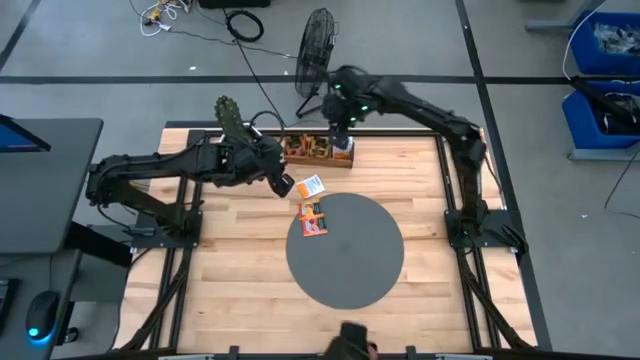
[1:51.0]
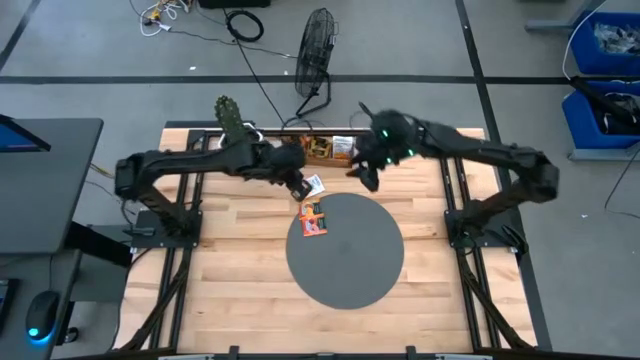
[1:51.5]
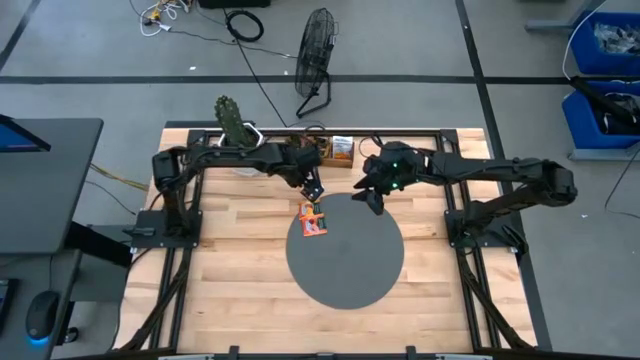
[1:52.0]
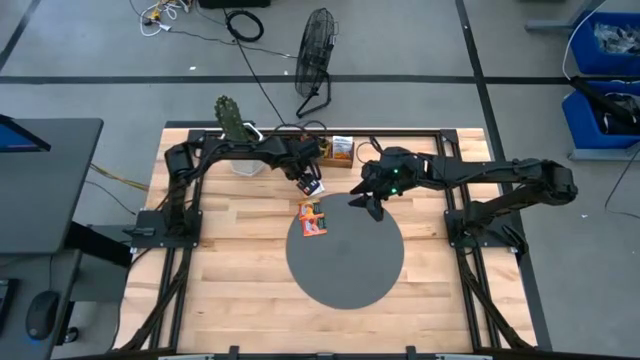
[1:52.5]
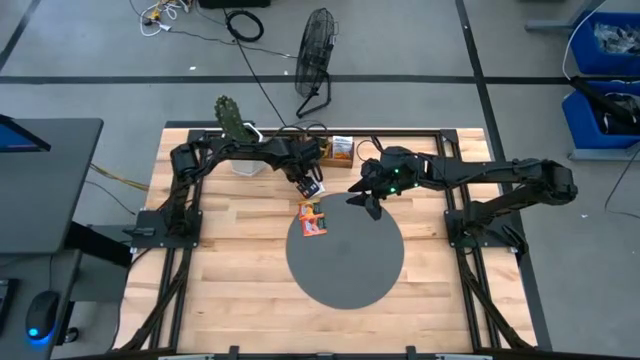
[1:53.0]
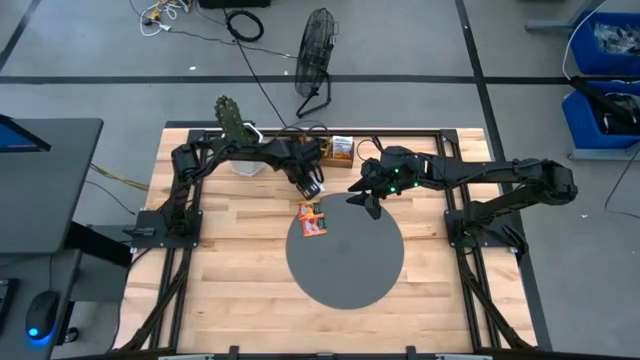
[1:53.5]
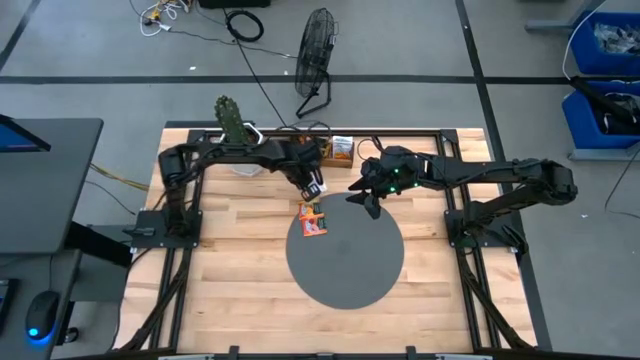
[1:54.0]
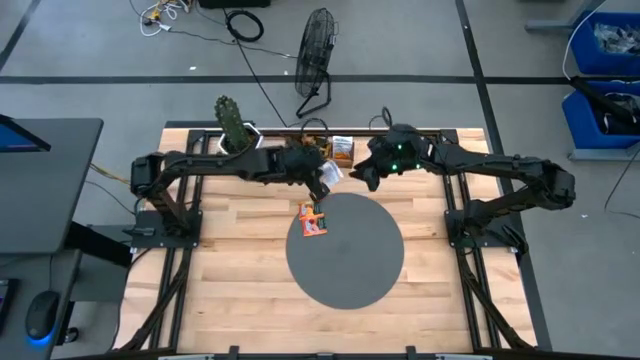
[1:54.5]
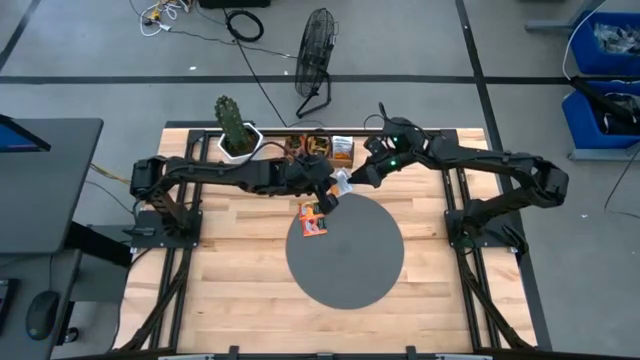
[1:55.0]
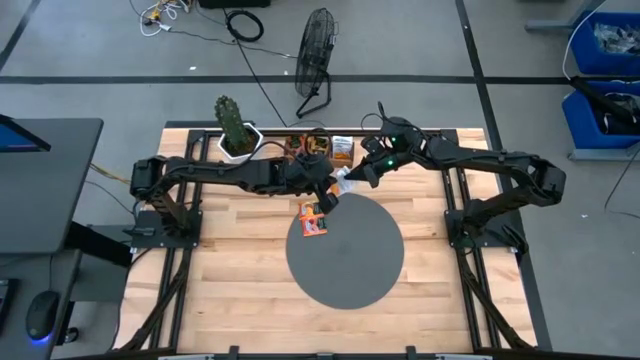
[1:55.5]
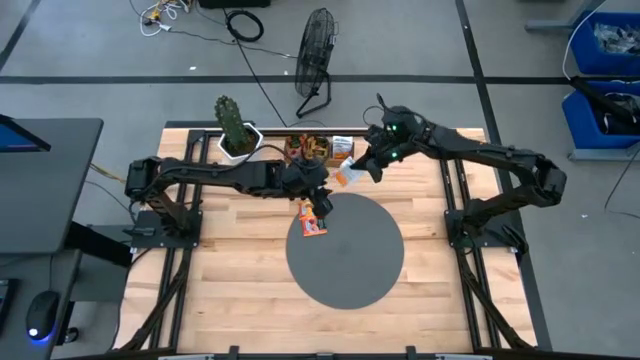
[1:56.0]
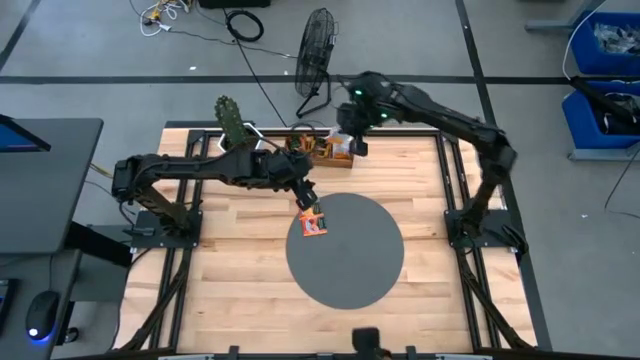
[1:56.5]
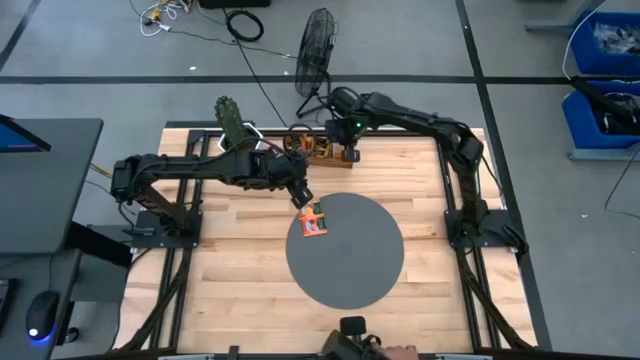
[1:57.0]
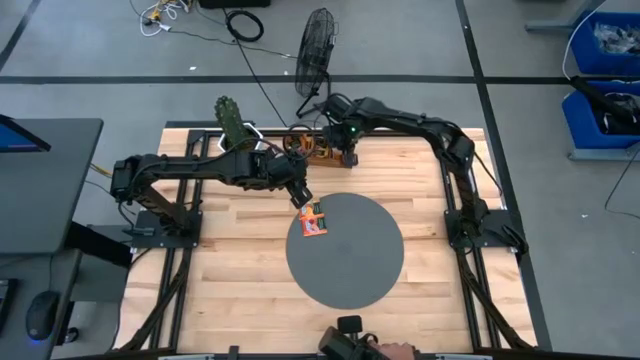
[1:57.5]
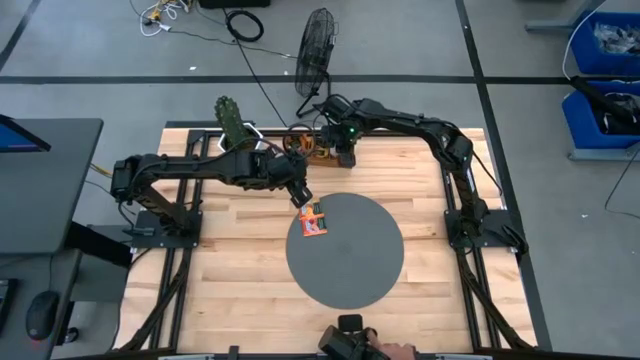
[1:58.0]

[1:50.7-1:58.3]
Task: Pick & Place Tea
Put the white tea bag into the right section of the wooden organizer

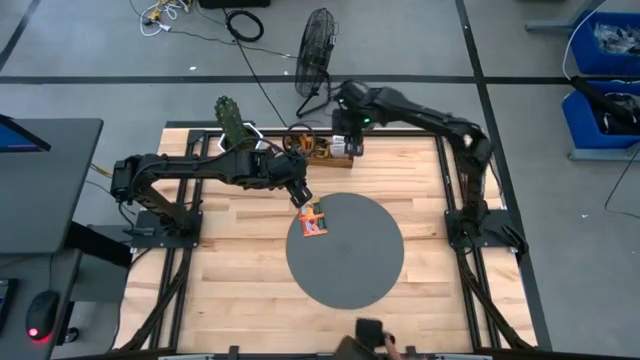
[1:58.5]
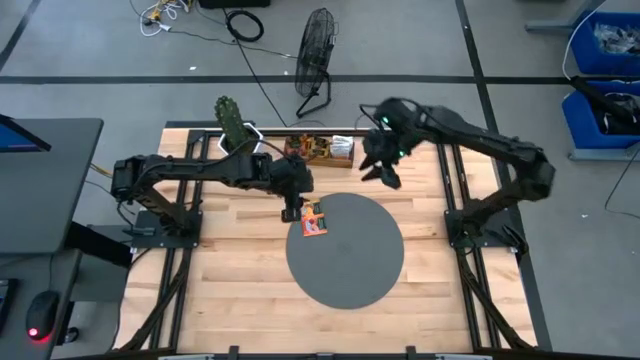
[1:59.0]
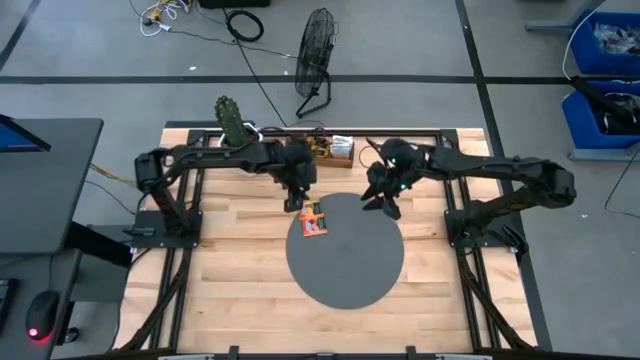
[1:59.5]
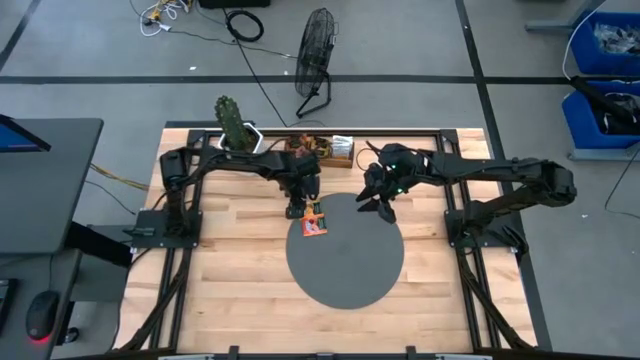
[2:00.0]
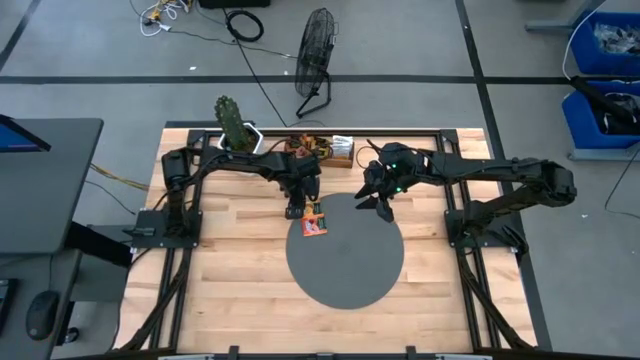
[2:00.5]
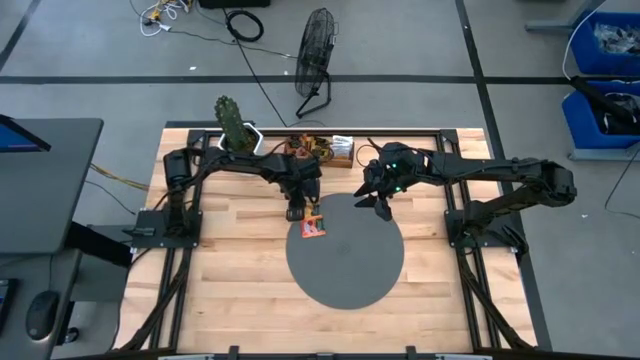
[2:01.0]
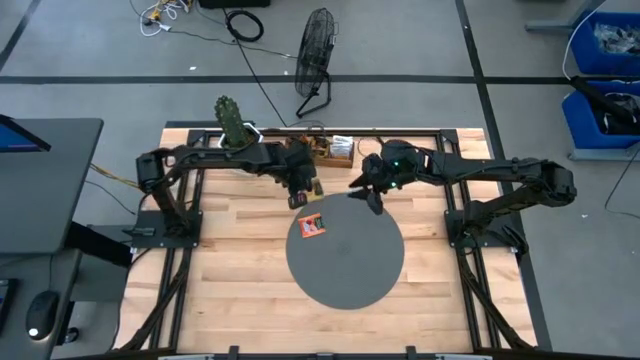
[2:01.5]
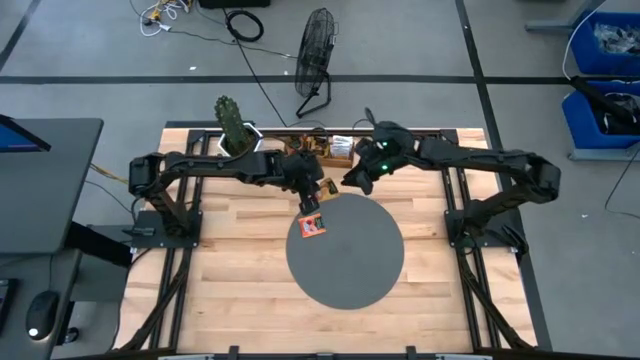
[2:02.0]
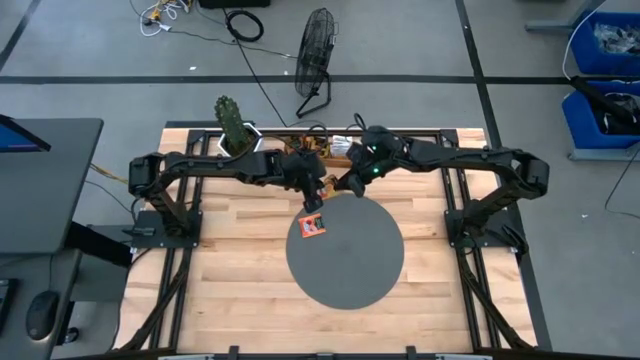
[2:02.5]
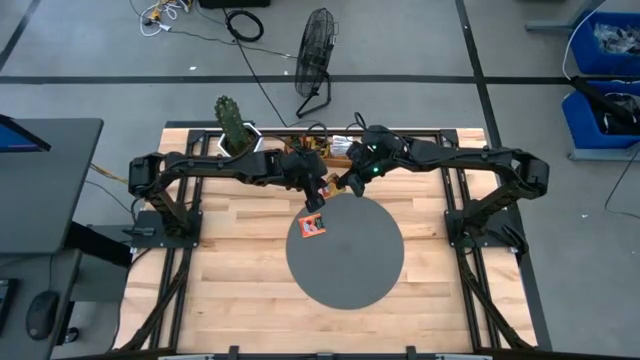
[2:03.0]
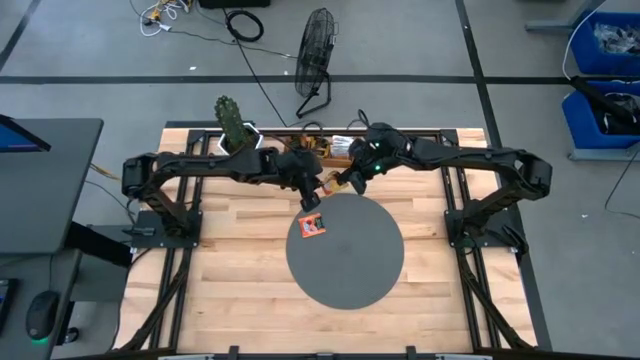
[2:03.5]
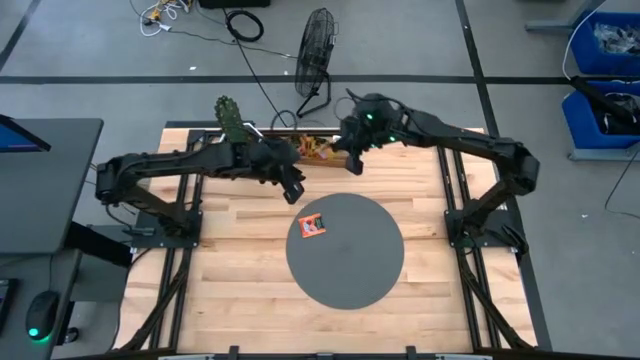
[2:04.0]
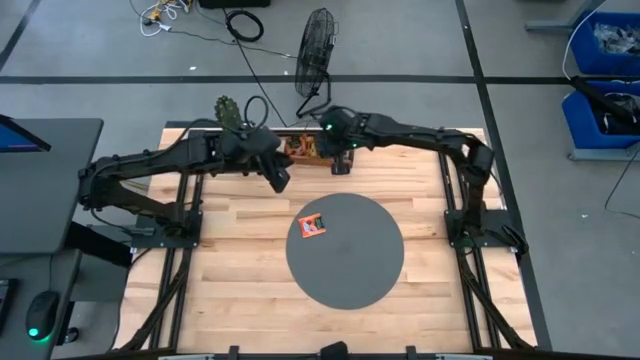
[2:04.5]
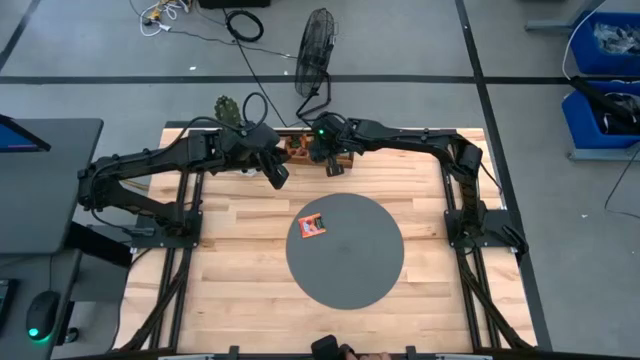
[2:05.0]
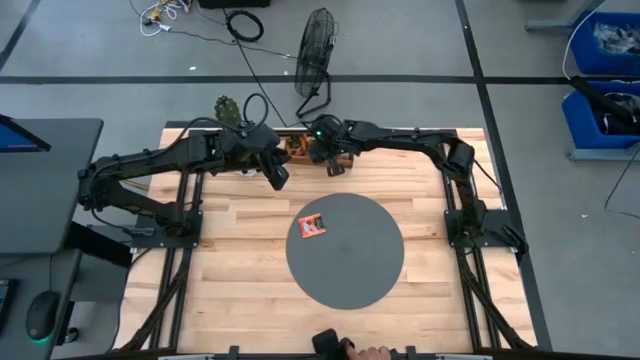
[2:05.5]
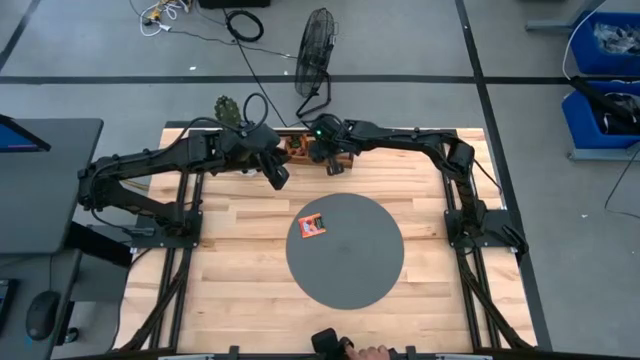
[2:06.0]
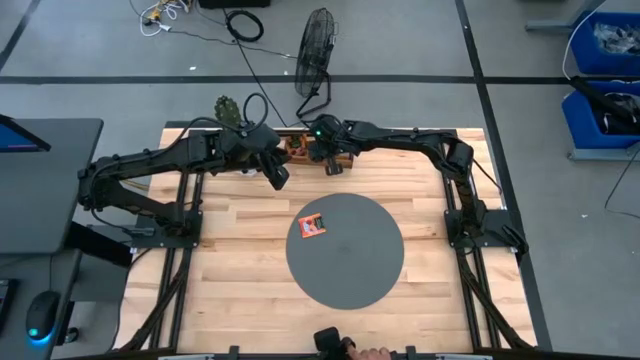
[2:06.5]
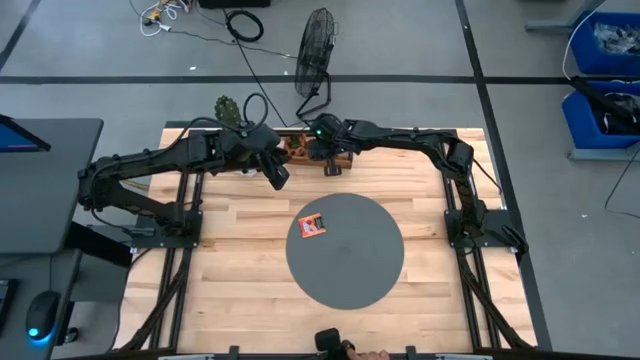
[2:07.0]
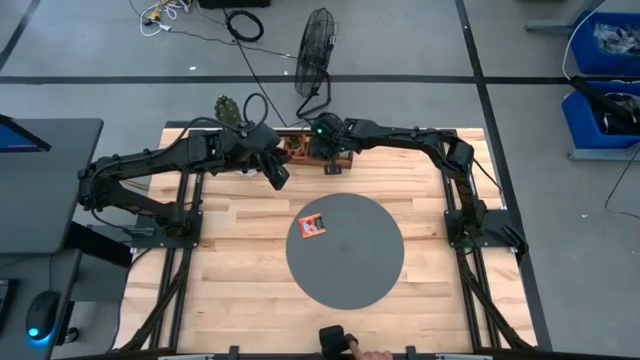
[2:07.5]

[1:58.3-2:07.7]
Put the yellow tea bag into the middle section of the wooden organizer

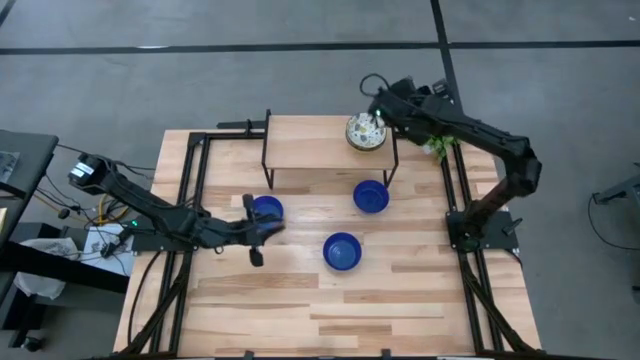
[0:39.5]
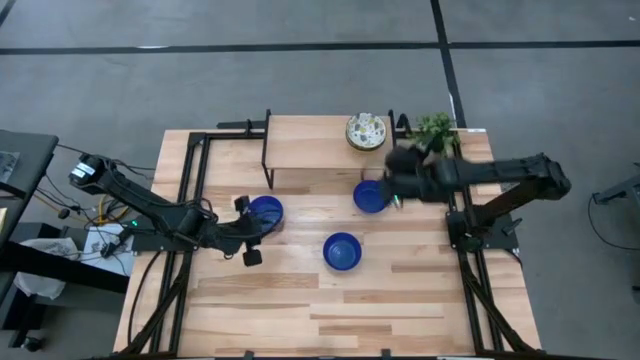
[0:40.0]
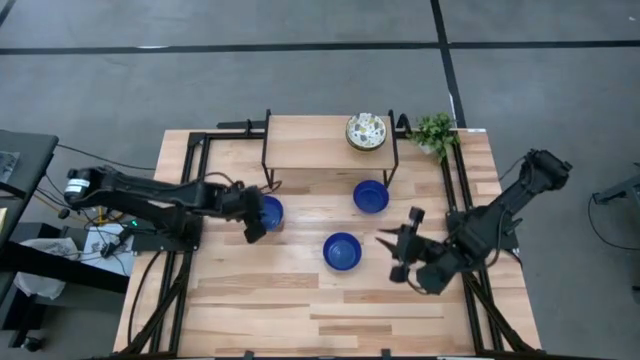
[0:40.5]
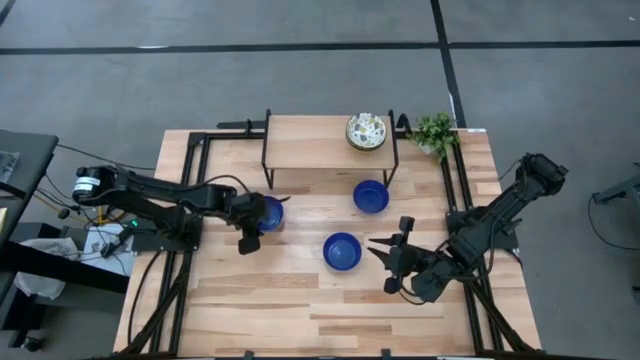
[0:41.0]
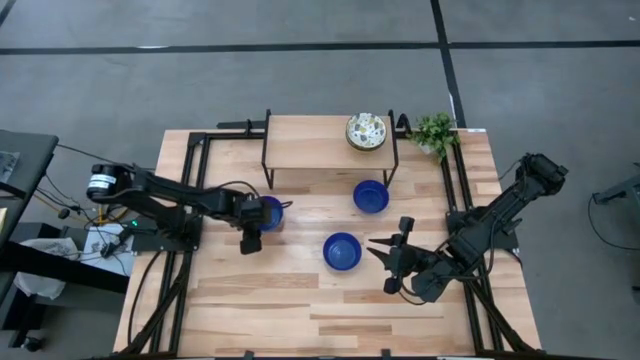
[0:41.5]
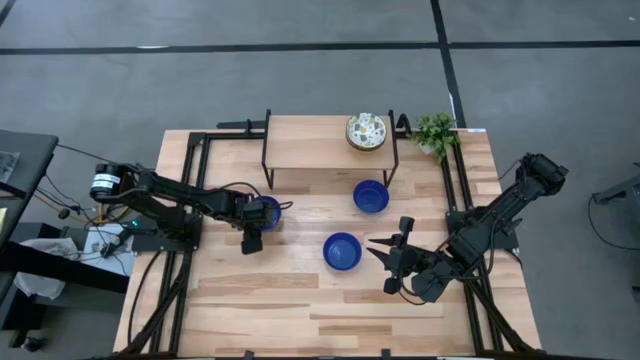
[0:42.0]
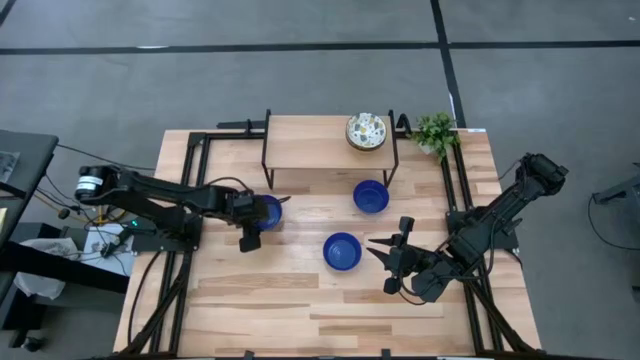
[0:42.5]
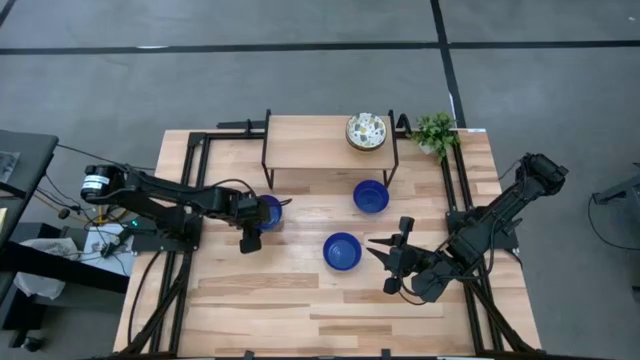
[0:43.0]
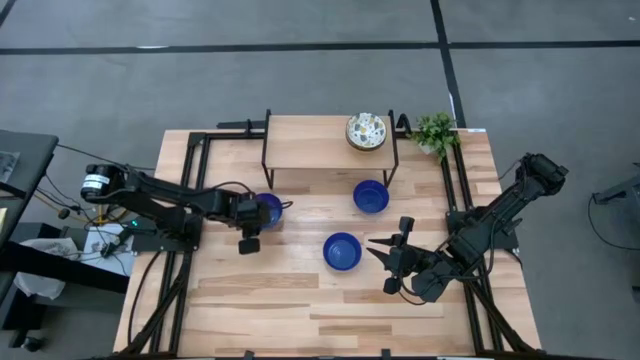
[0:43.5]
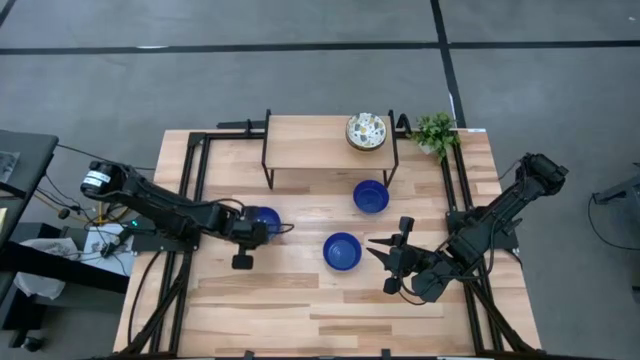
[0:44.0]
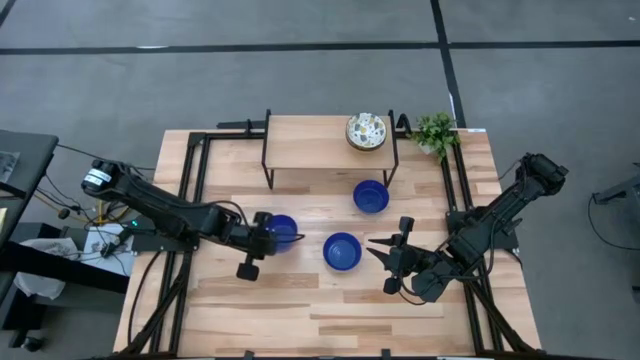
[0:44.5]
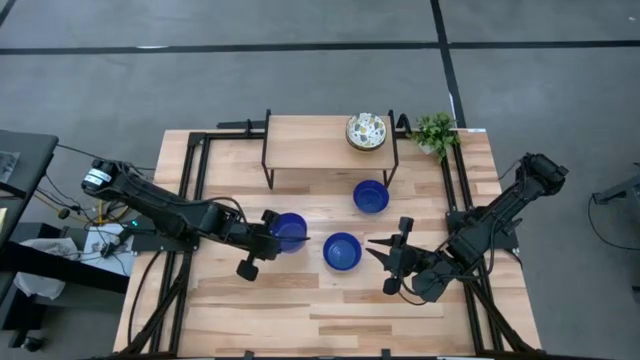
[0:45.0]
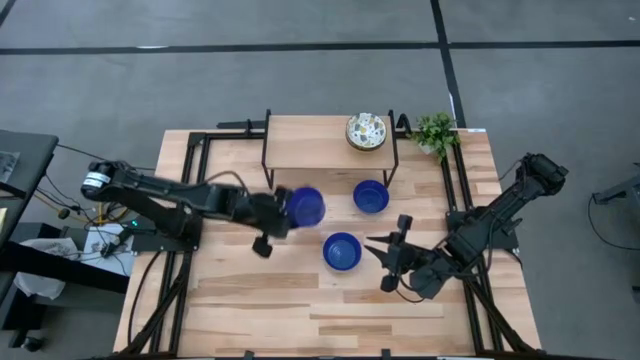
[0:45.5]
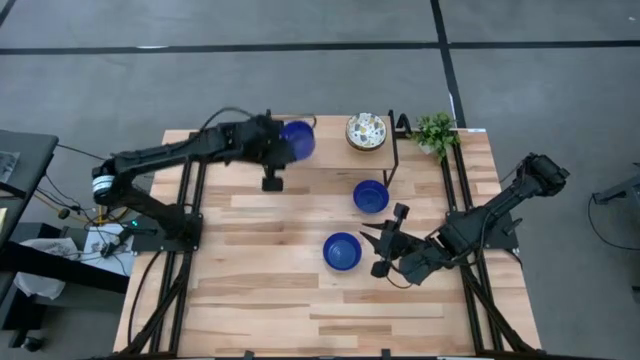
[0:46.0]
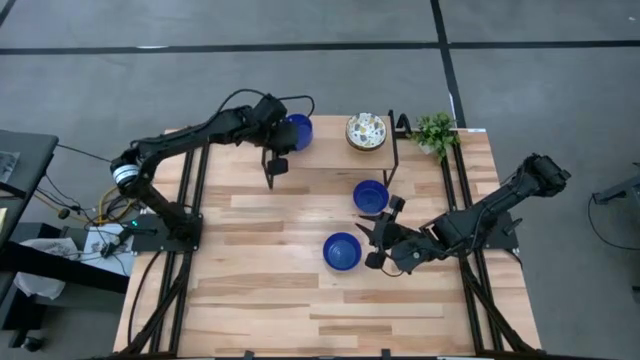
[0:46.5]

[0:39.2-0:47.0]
Task: Pick & Place Mini bowls
Put the top left blue bowl on the shelf
